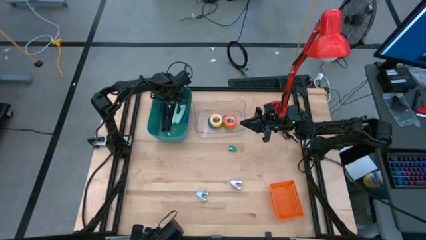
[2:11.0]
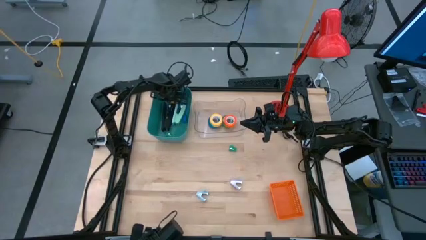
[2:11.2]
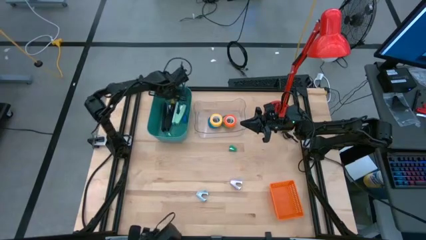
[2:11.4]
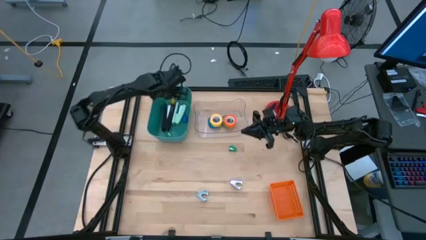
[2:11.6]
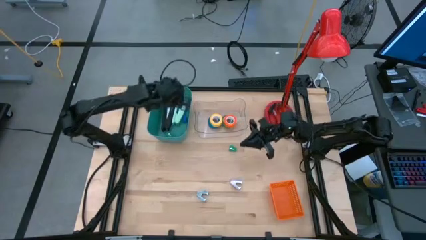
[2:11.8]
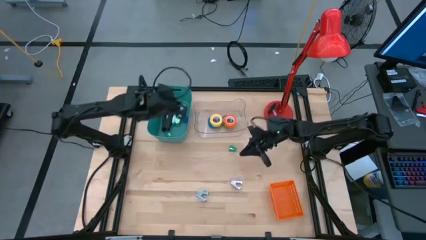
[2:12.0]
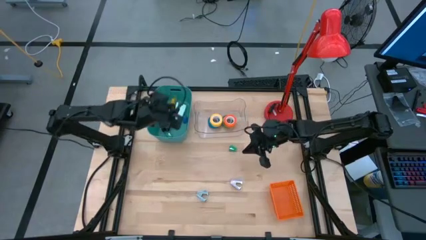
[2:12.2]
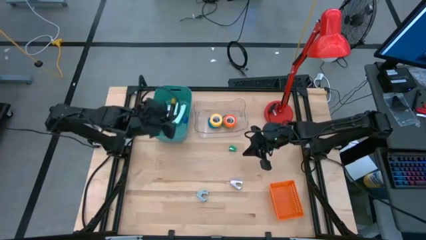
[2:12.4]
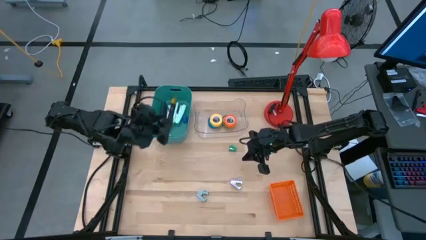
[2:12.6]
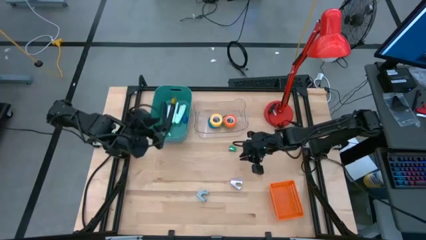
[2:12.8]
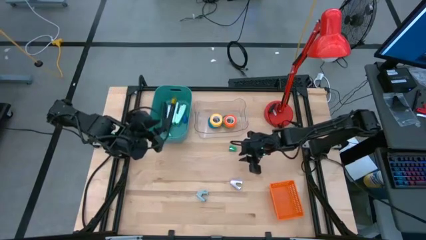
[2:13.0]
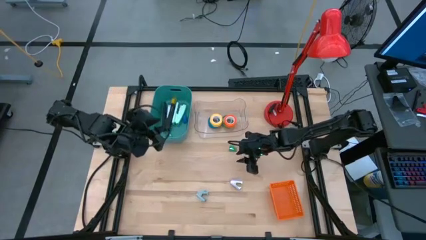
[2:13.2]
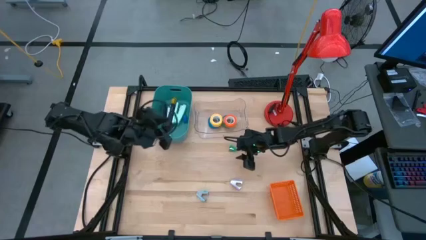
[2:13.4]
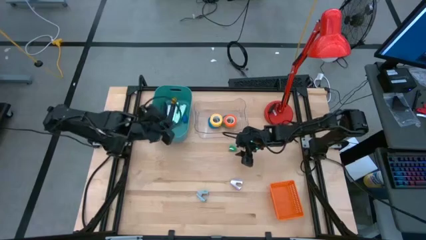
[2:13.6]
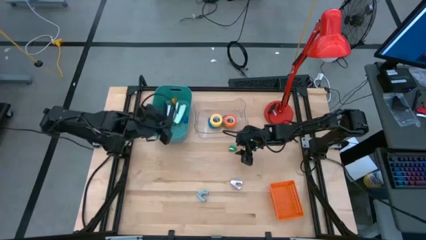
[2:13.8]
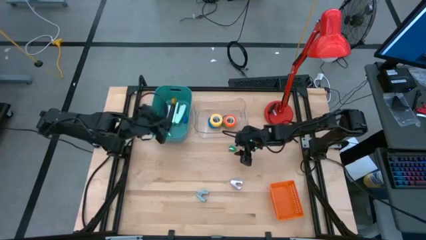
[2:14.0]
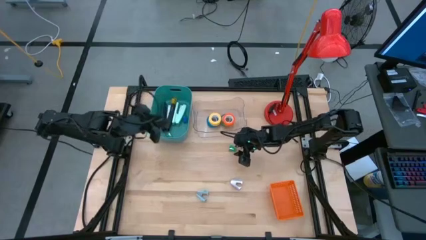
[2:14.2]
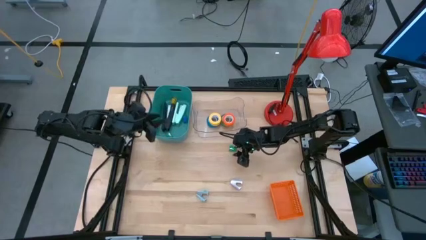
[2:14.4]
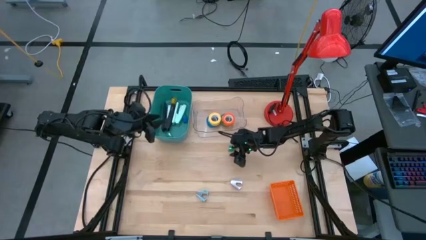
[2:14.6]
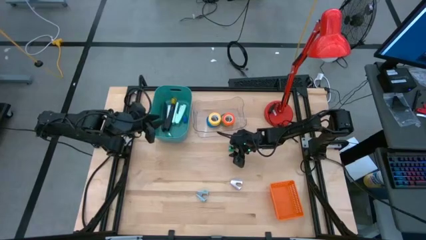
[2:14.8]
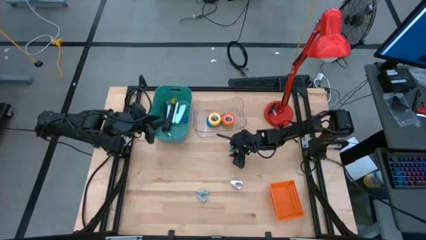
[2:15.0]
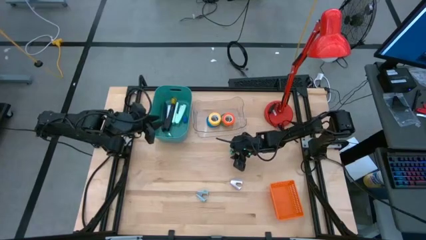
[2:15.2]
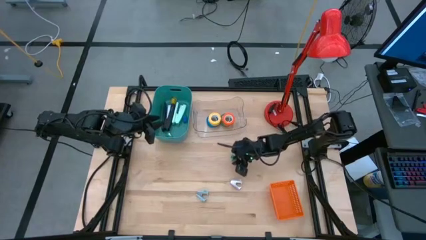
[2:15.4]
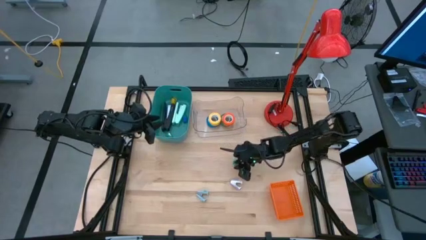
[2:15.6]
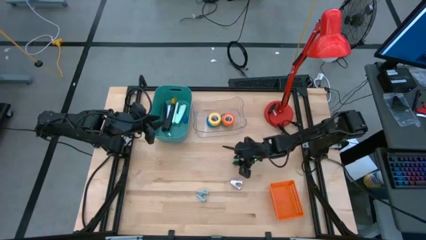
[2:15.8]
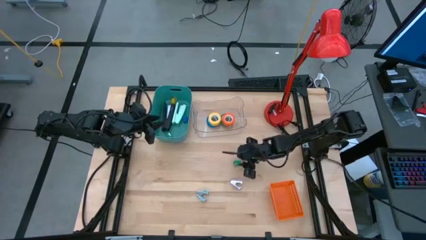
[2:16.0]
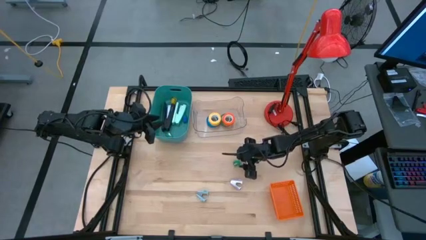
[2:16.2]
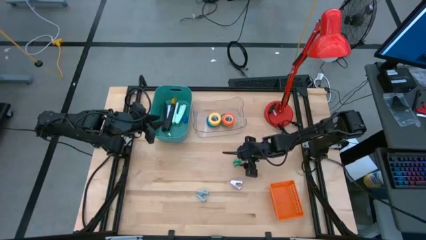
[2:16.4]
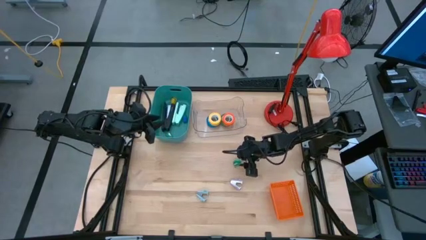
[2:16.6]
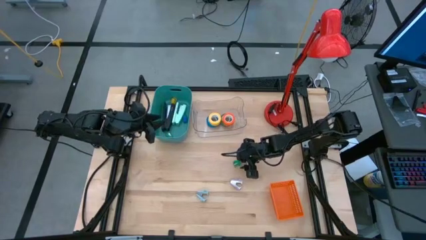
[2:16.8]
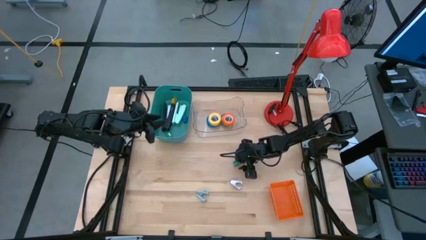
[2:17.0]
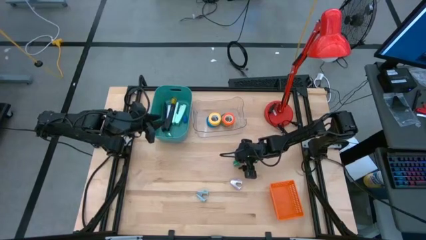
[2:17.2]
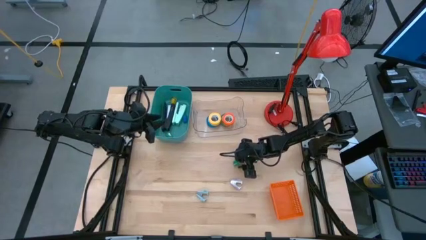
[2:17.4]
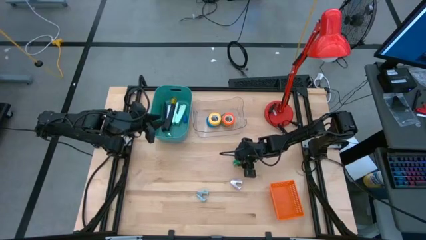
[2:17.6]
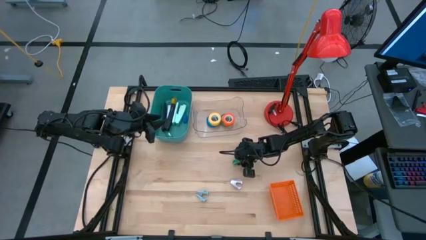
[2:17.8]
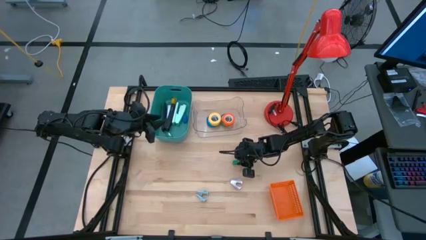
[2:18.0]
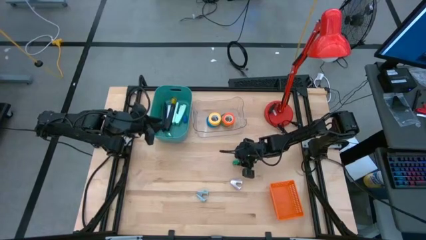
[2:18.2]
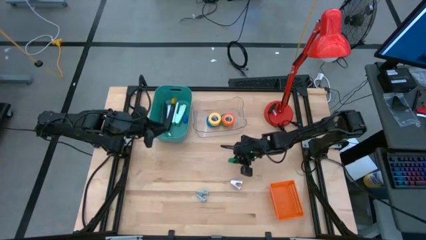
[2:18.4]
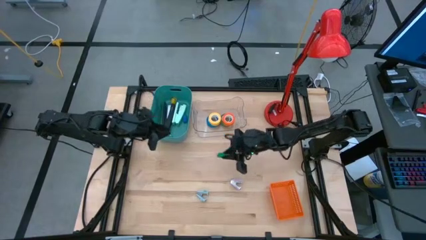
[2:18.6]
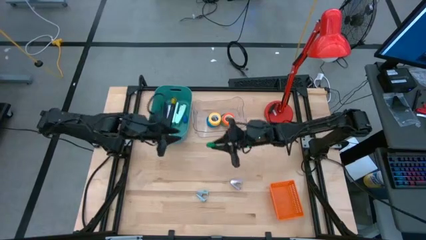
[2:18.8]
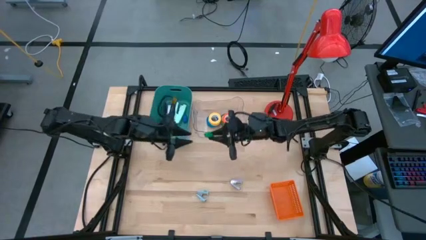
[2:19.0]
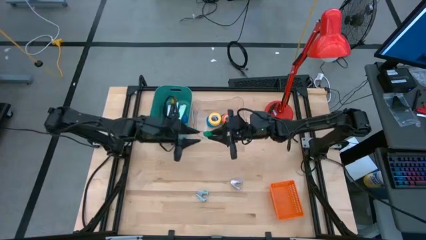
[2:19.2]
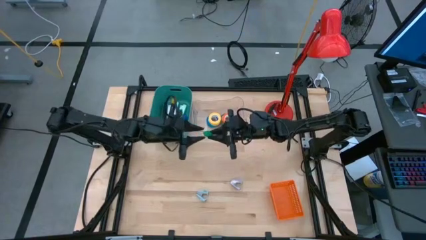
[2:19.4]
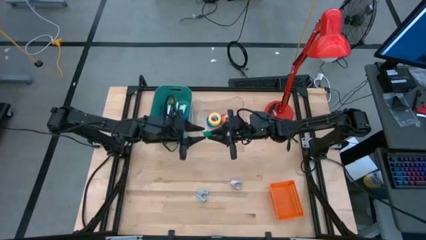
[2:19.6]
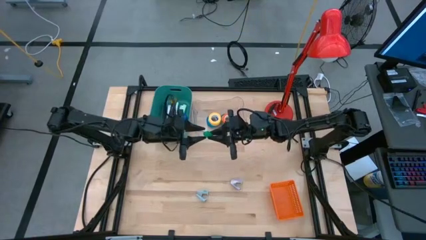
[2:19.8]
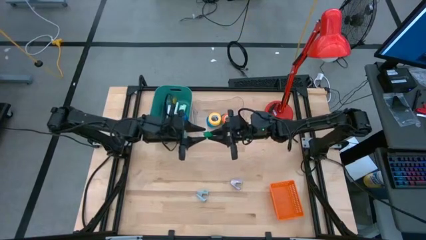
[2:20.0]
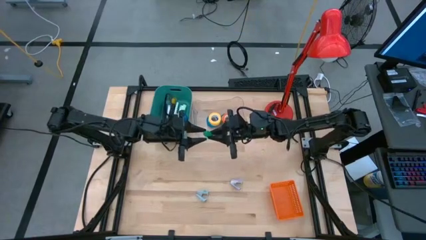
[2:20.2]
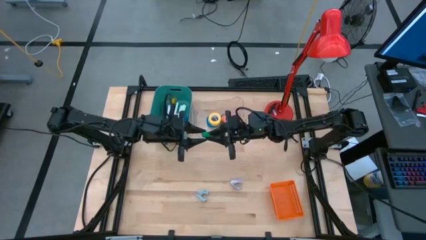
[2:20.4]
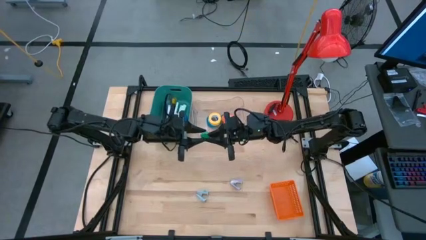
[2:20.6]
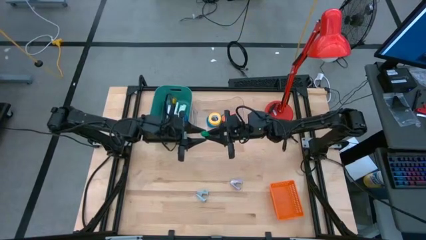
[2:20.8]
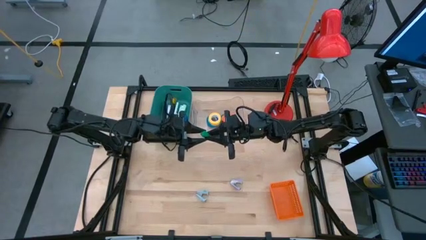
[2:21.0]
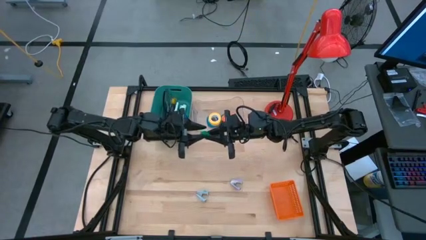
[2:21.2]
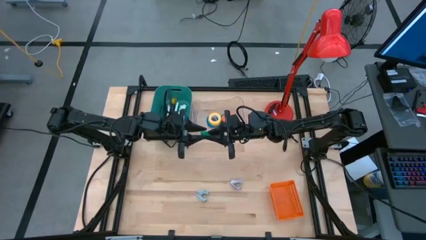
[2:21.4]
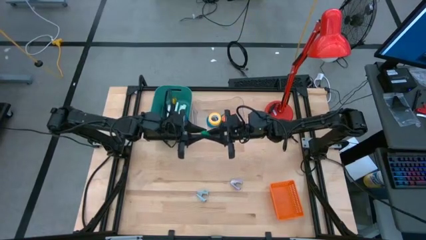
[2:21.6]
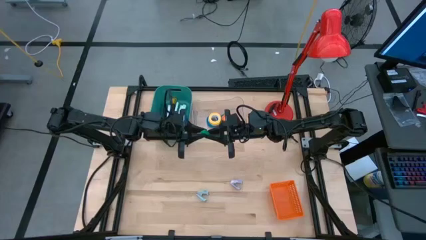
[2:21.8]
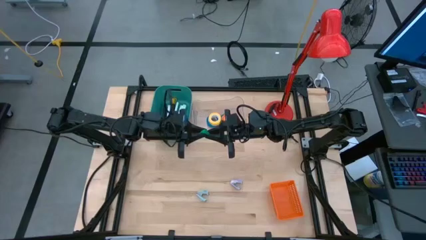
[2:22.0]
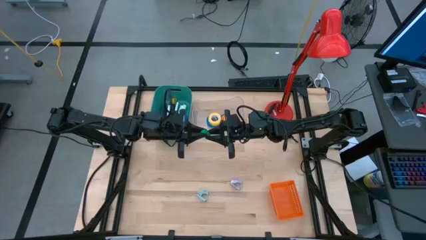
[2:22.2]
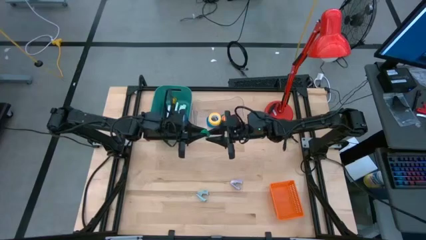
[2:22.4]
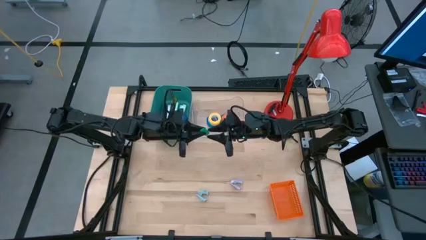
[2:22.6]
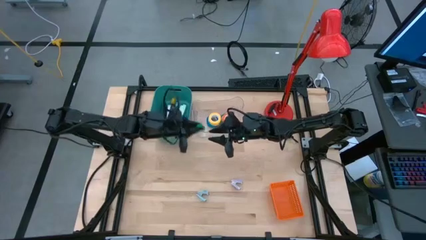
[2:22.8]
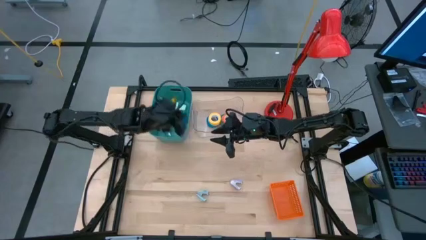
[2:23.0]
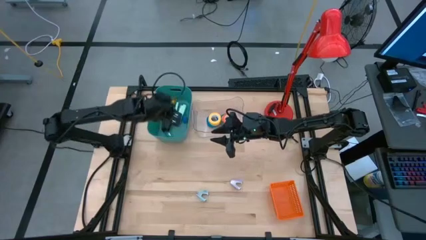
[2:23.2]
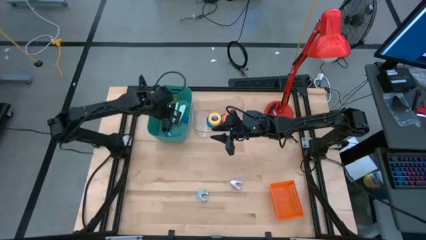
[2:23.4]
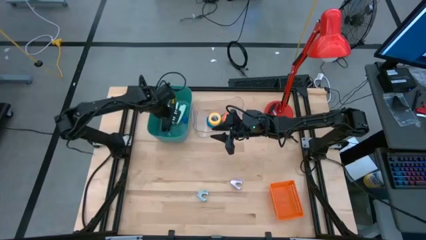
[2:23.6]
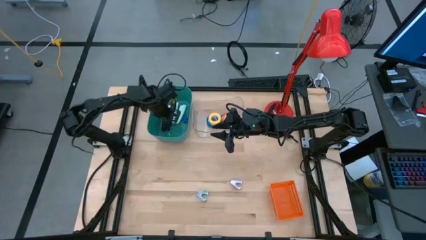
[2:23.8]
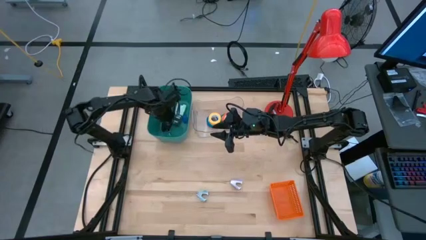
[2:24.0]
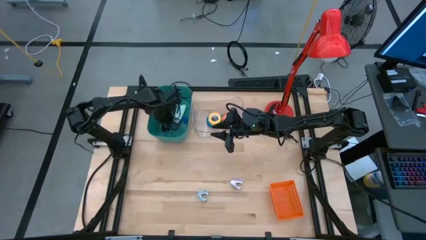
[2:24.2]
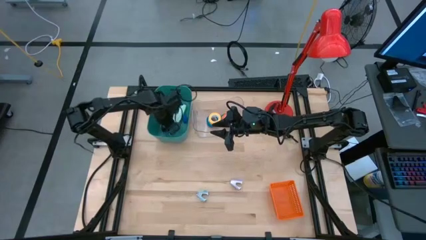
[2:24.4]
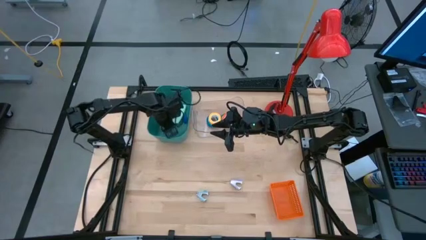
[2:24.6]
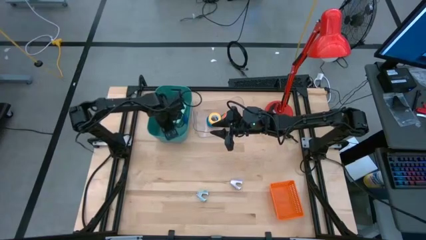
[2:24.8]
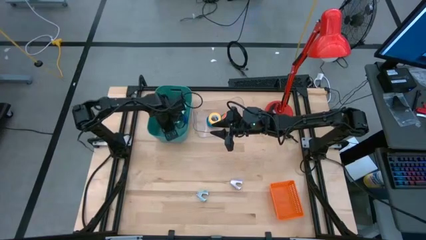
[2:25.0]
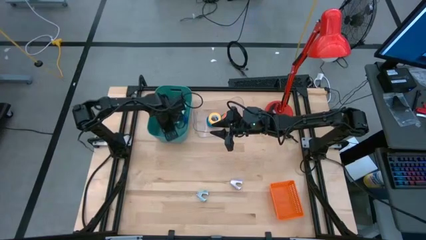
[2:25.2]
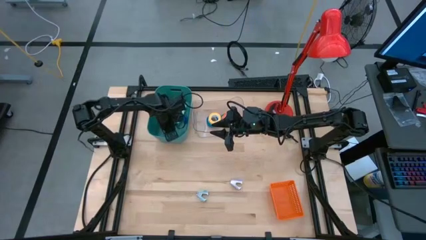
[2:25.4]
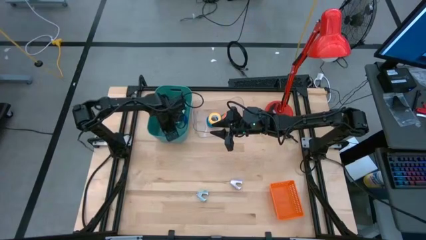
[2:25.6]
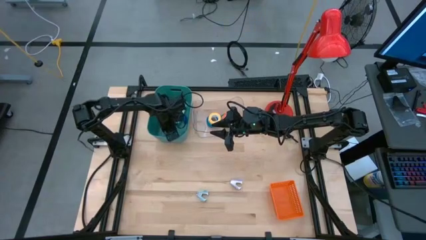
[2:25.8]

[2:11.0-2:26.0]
Task: Pick and place Stapler, Stapler remover, tape
Put the green stapler remover into the green bin
